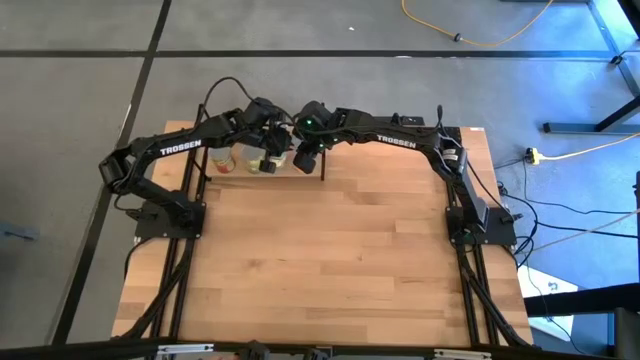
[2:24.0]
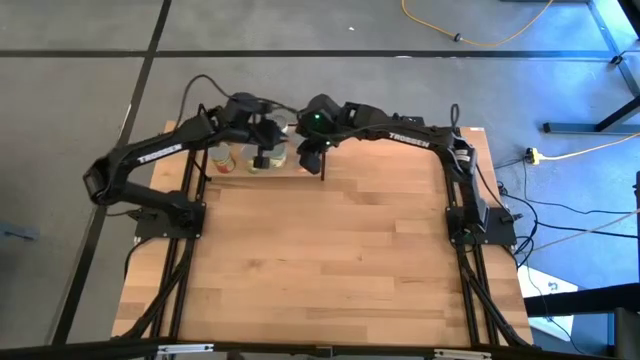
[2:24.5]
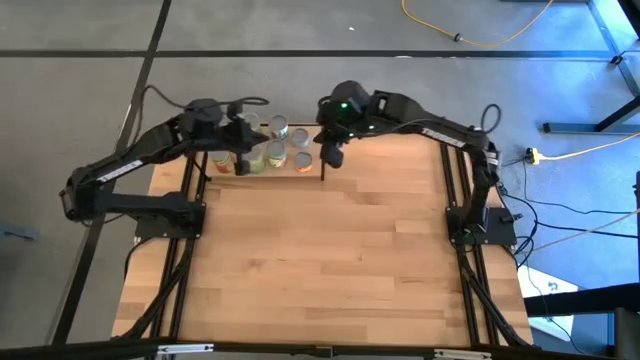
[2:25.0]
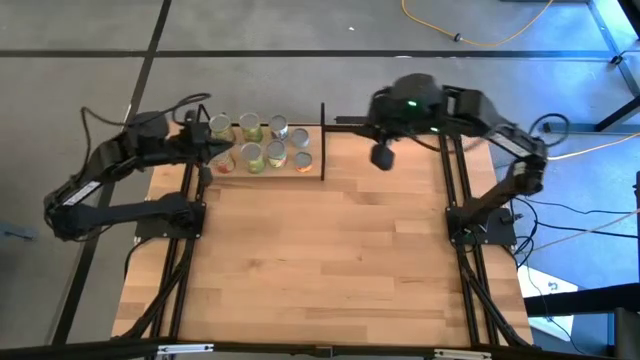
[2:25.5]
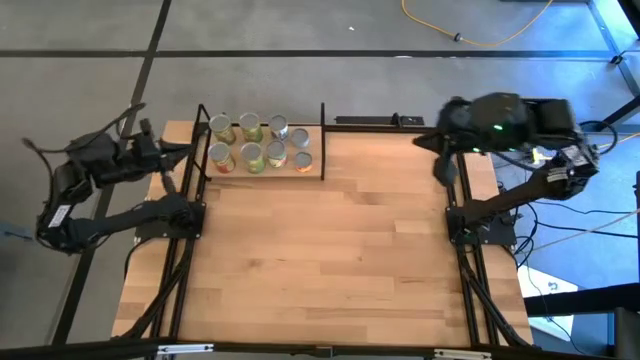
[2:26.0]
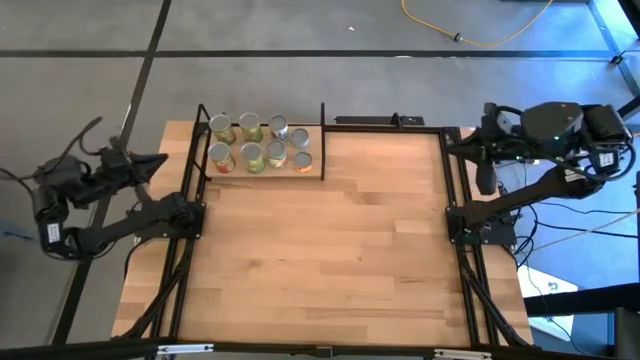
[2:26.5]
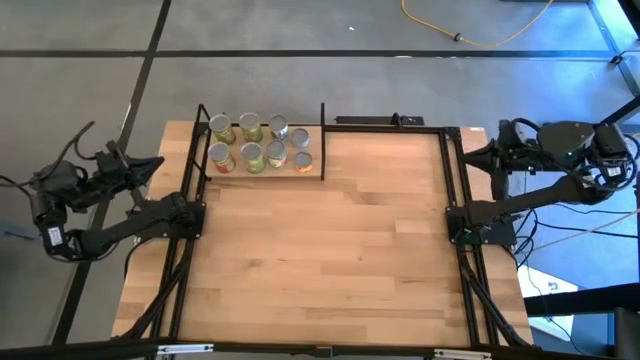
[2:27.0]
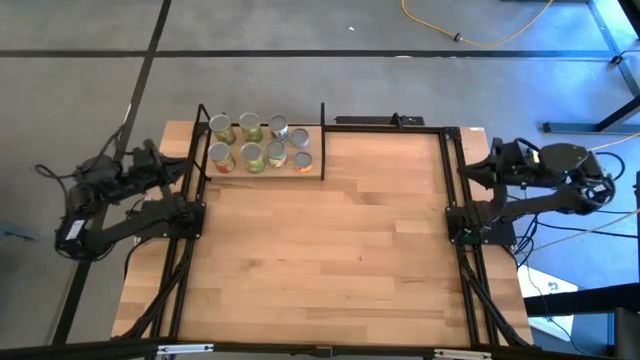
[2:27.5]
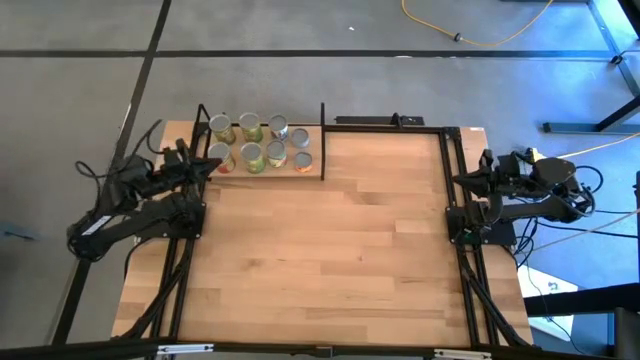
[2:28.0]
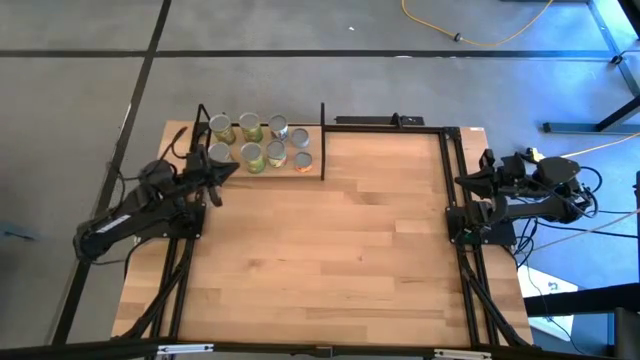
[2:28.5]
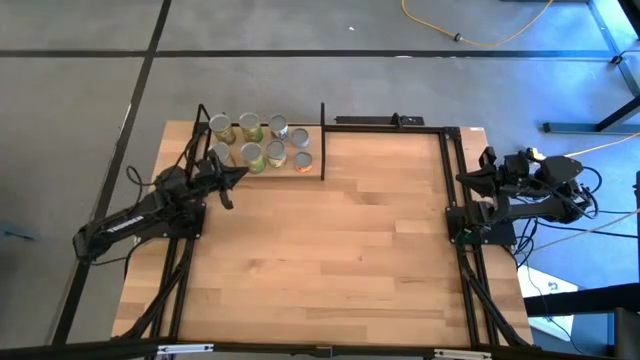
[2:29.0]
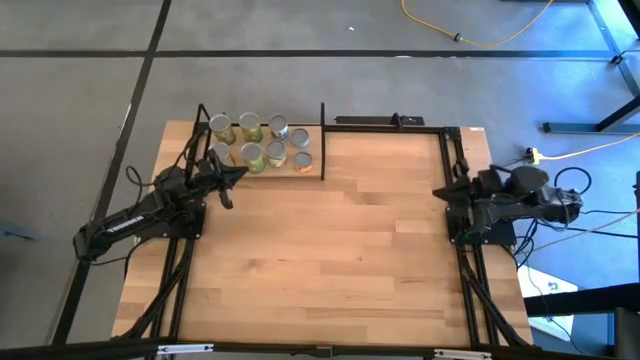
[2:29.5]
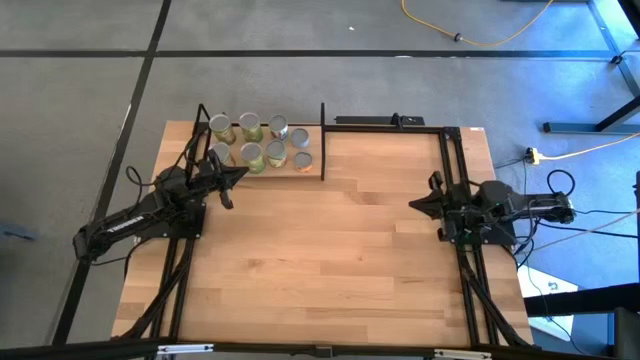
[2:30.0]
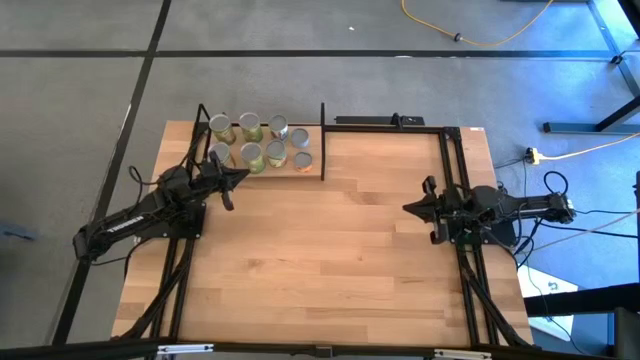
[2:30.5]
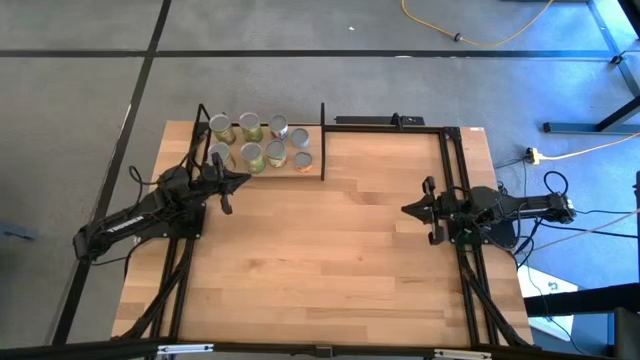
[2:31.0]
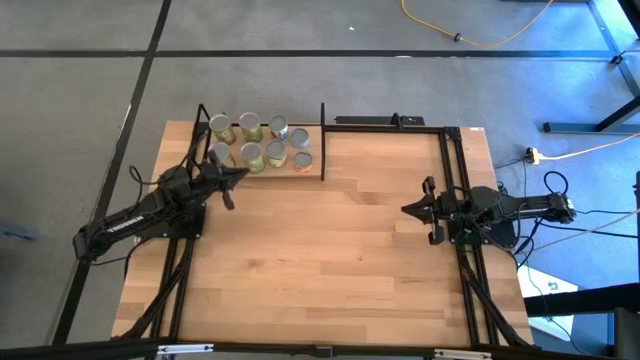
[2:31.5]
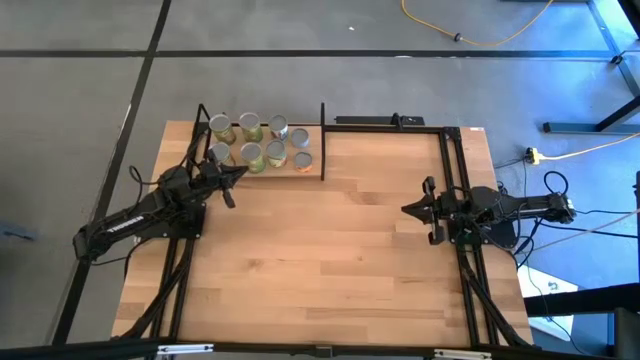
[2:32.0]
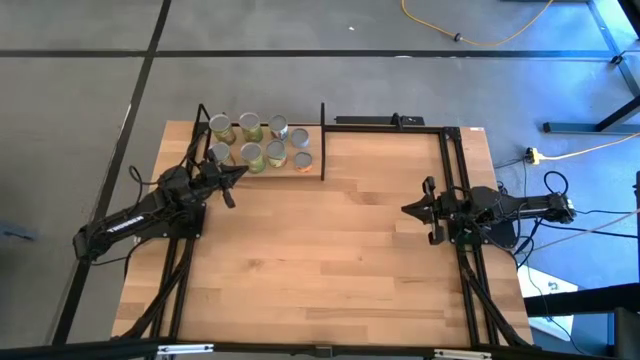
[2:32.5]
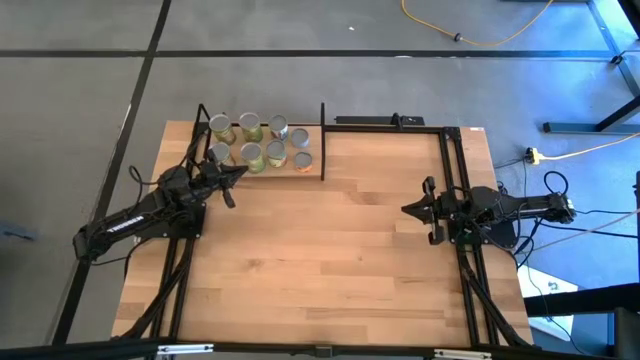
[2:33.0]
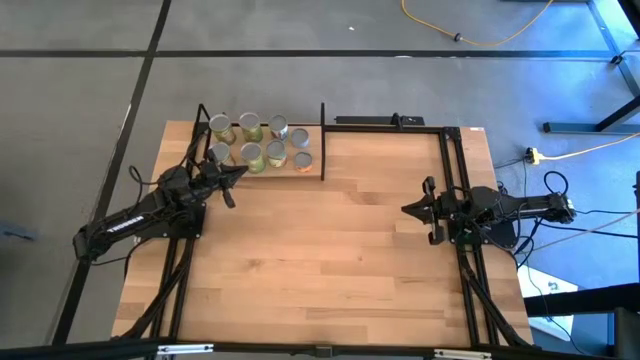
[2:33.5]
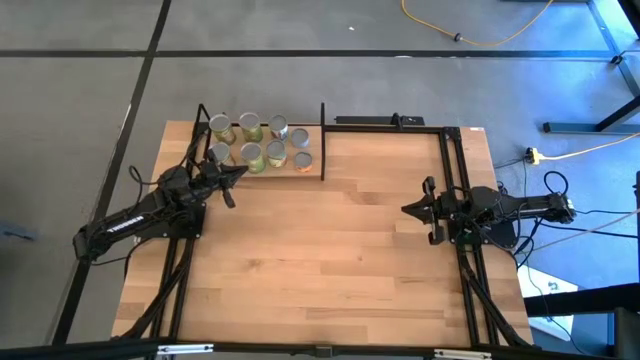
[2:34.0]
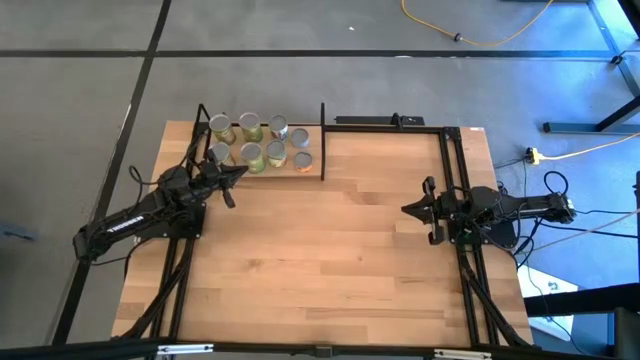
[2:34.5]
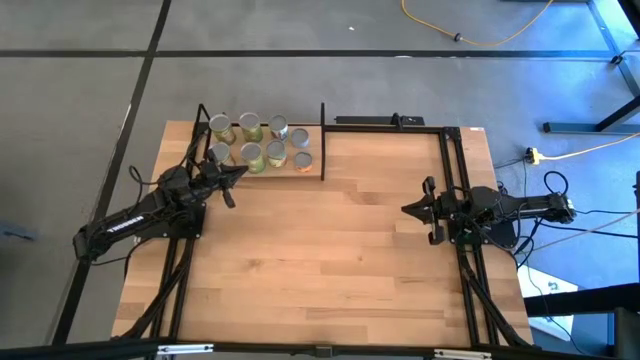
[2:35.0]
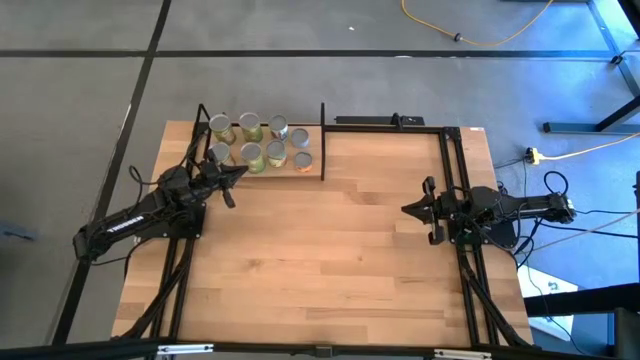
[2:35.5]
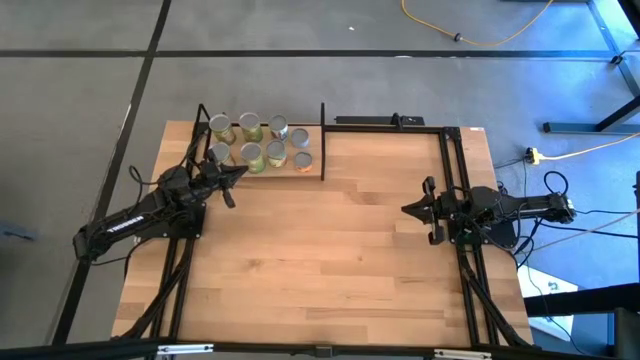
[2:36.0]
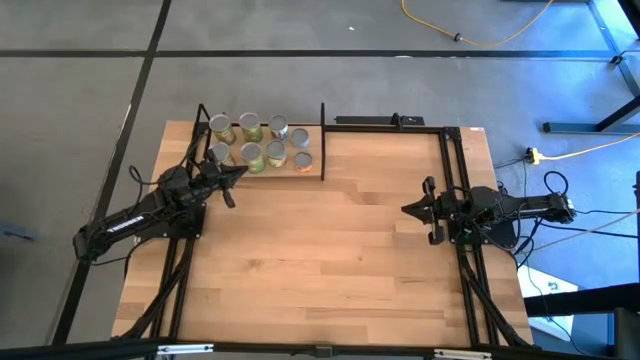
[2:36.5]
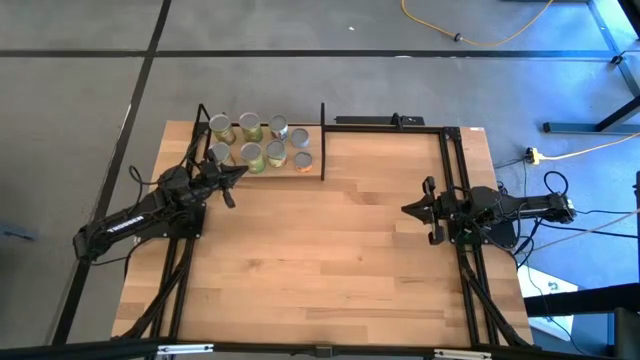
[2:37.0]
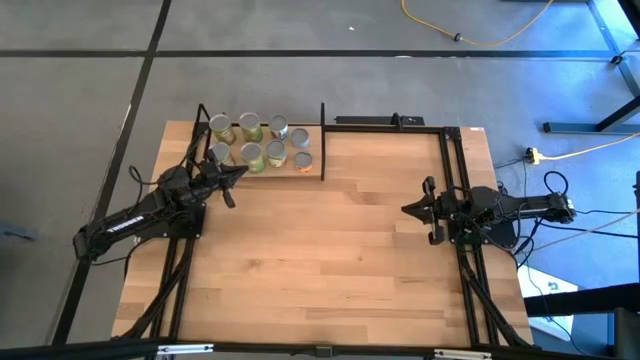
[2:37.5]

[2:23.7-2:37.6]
Task: Pick and place cans onto a shelf
Return to Home Position

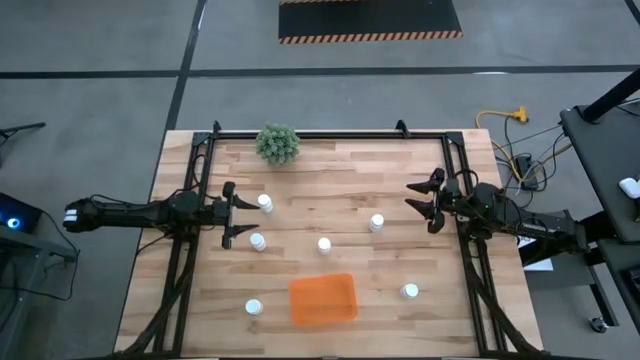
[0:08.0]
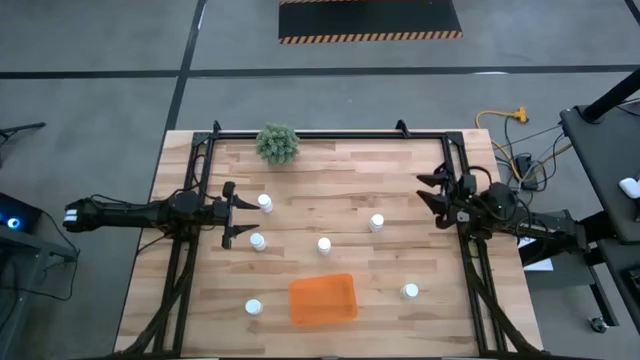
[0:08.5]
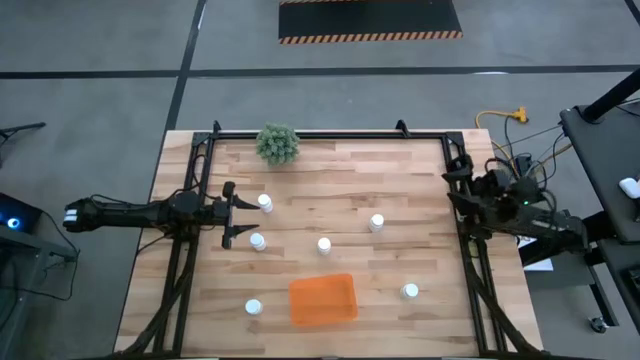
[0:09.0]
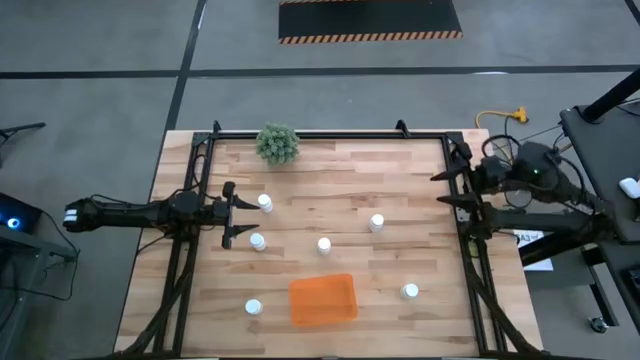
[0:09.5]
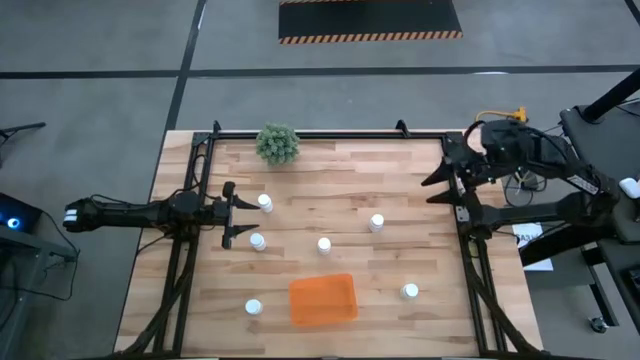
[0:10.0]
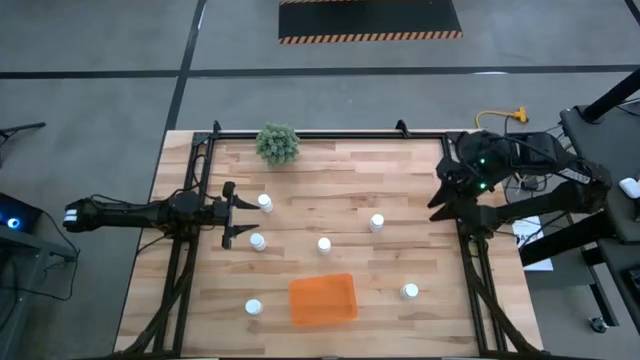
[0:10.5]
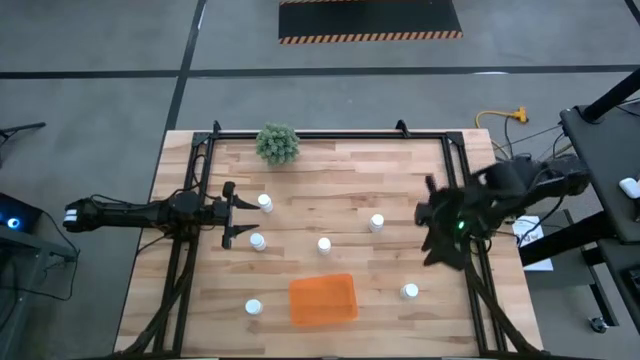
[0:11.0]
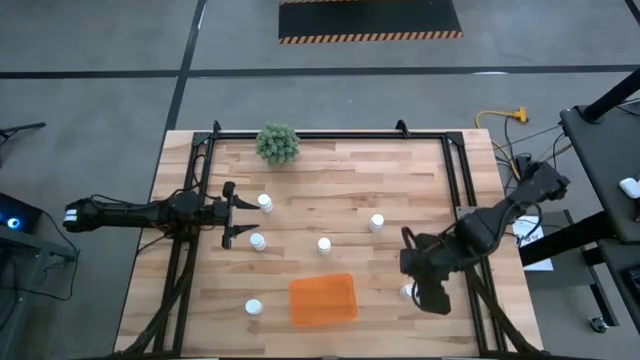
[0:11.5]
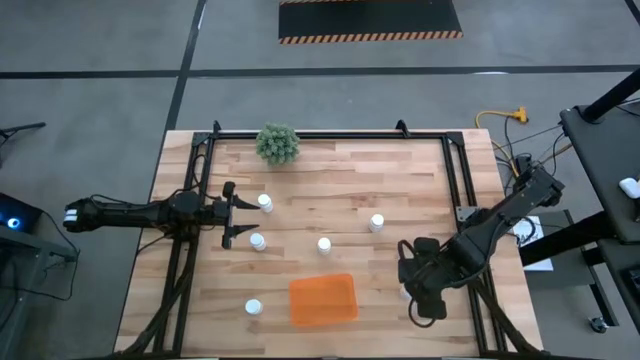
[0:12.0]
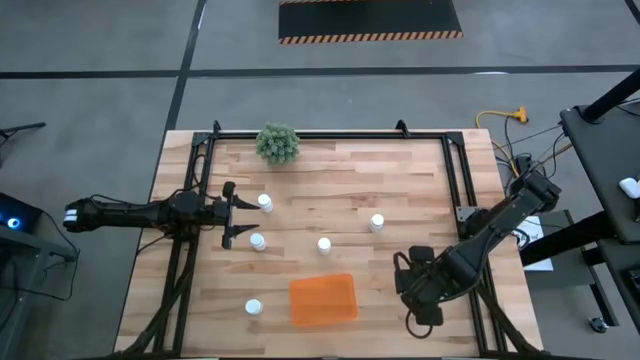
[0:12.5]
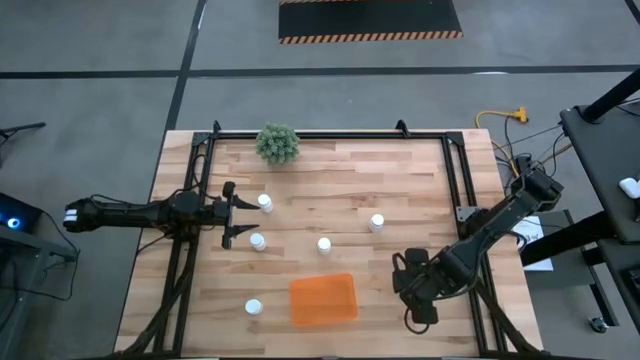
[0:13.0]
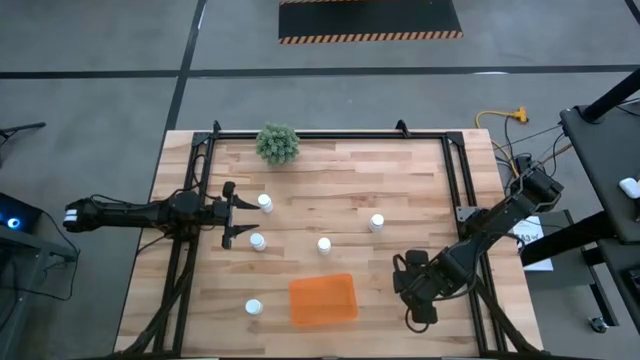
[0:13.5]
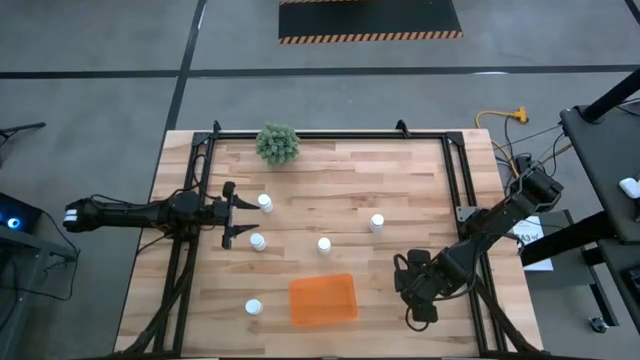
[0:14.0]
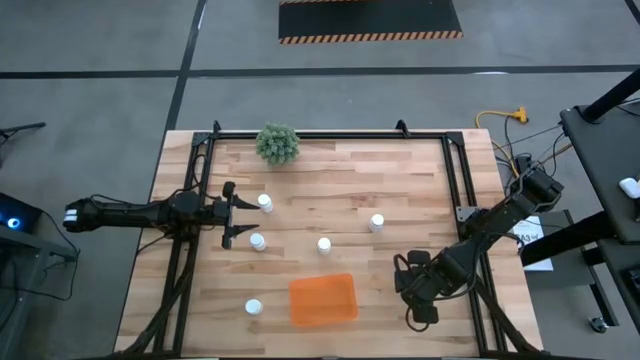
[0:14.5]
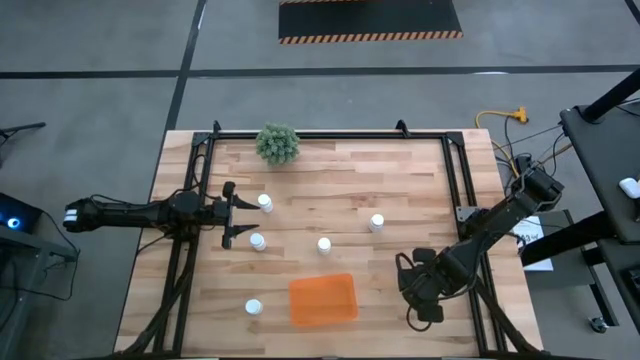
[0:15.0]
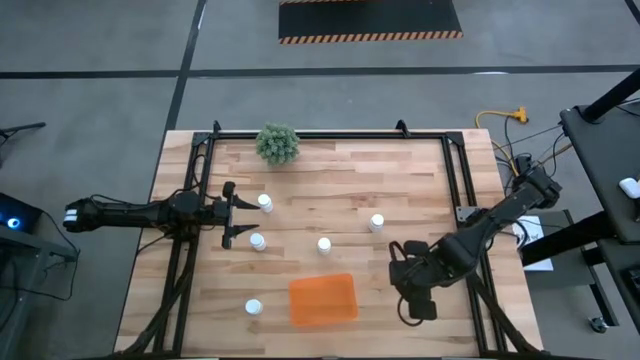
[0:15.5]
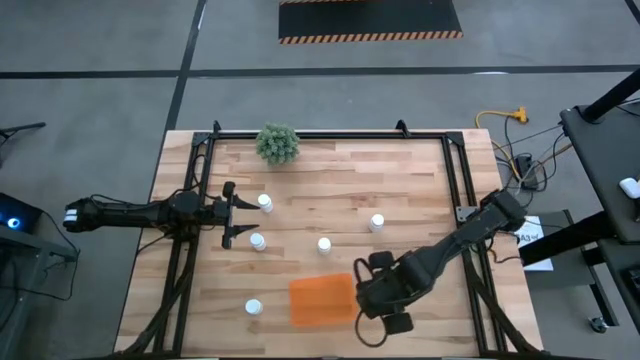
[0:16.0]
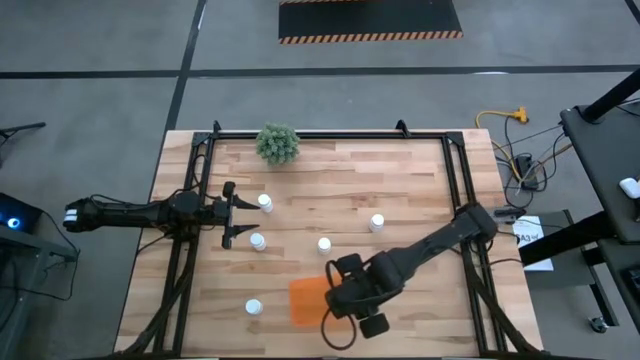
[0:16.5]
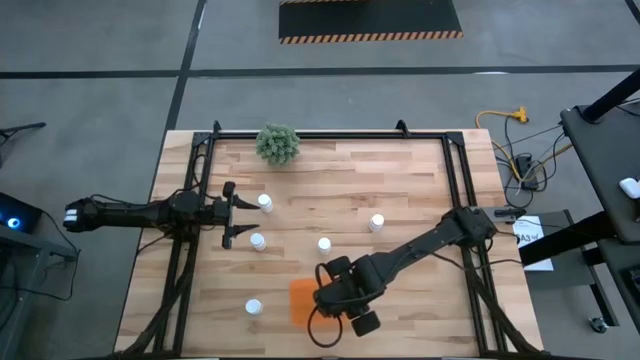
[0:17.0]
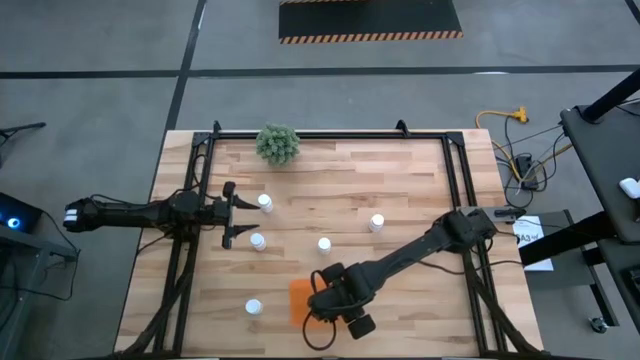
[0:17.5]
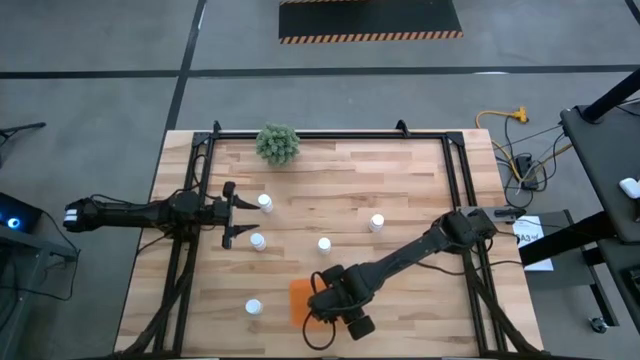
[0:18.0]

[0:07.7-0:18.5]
Task: Pick and place pill bottles into a basket
Put the pill bottle into the bin
